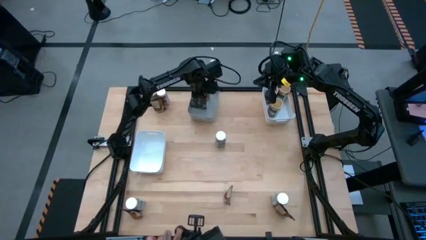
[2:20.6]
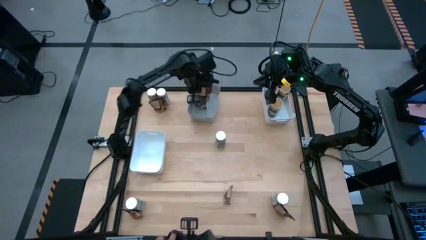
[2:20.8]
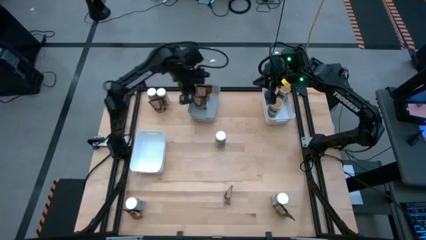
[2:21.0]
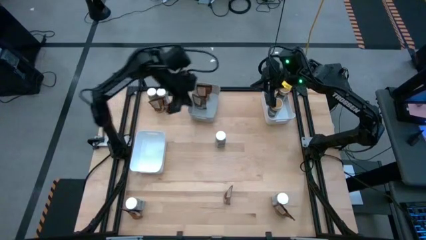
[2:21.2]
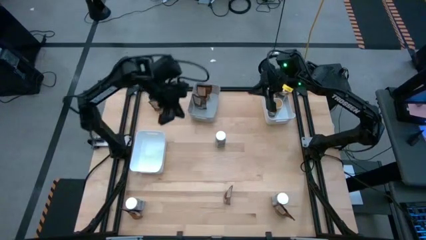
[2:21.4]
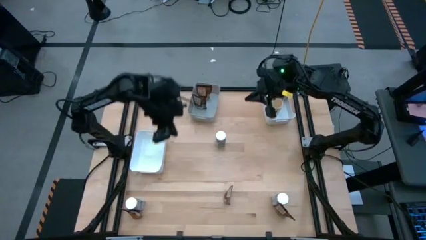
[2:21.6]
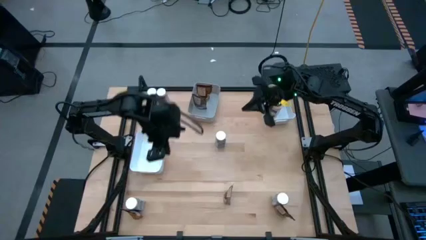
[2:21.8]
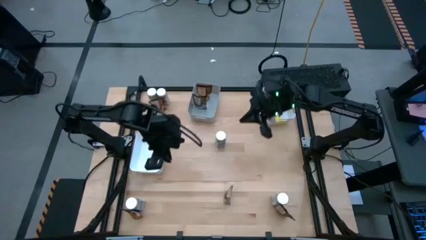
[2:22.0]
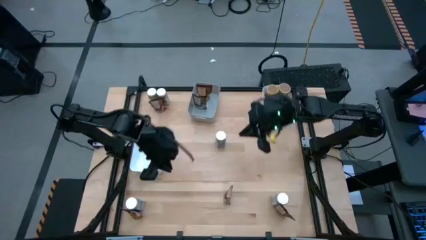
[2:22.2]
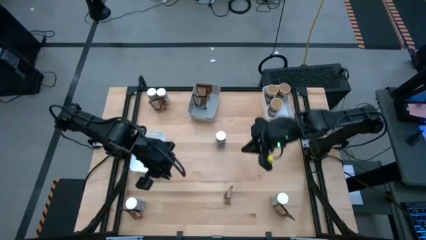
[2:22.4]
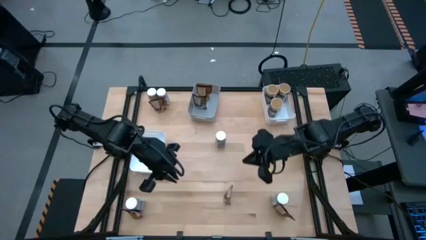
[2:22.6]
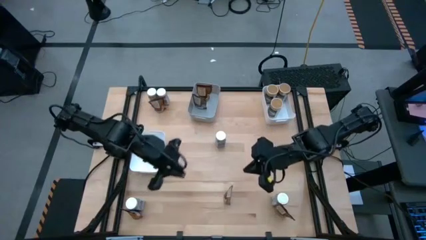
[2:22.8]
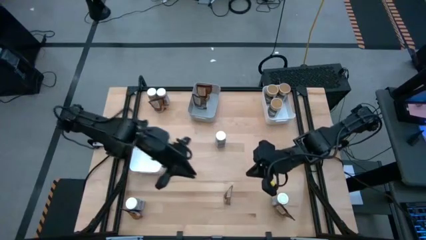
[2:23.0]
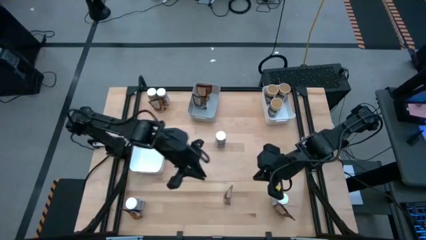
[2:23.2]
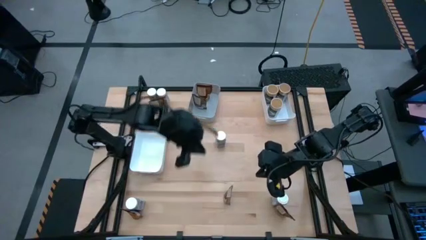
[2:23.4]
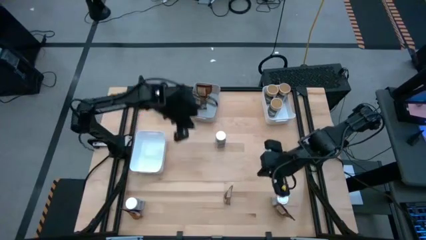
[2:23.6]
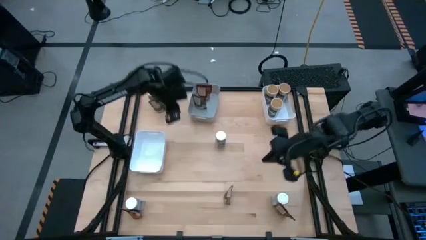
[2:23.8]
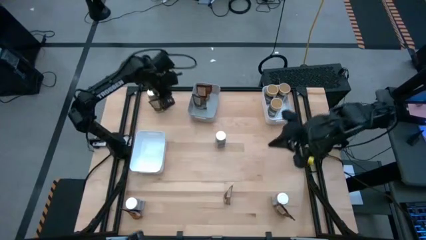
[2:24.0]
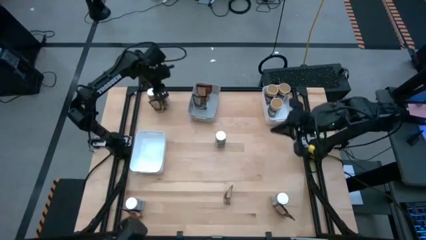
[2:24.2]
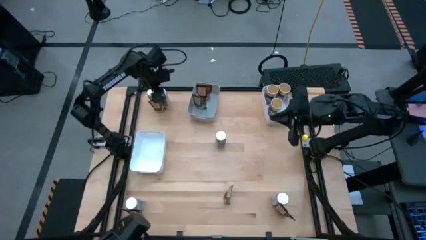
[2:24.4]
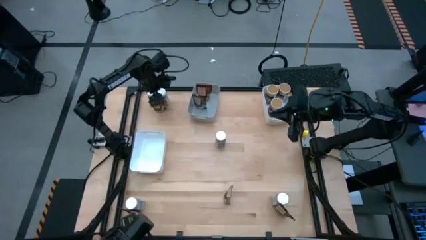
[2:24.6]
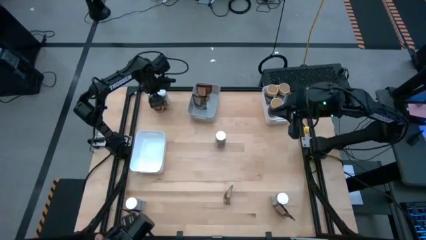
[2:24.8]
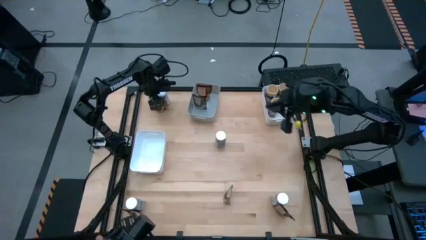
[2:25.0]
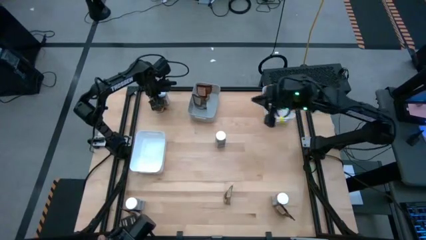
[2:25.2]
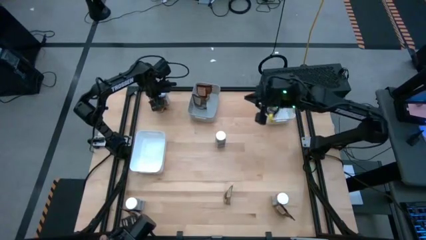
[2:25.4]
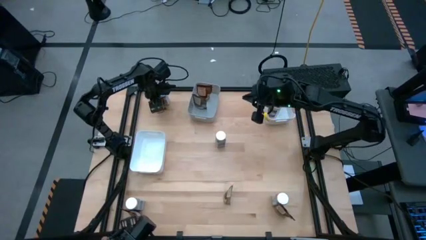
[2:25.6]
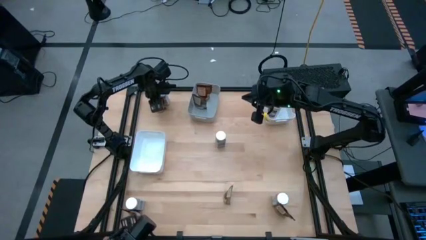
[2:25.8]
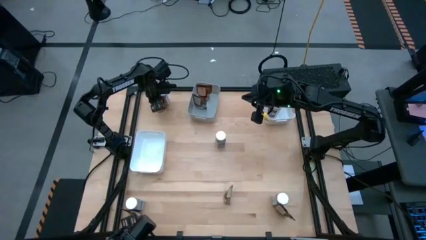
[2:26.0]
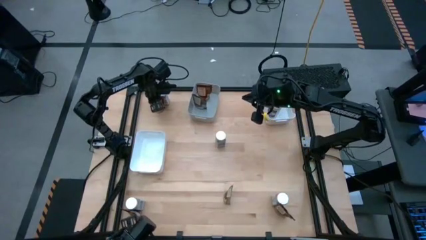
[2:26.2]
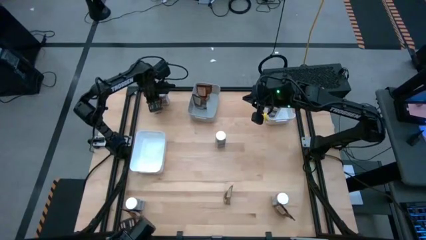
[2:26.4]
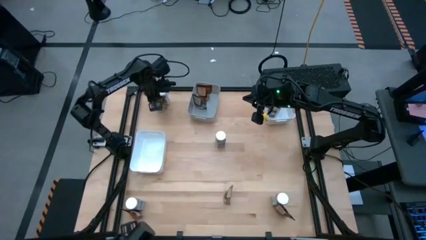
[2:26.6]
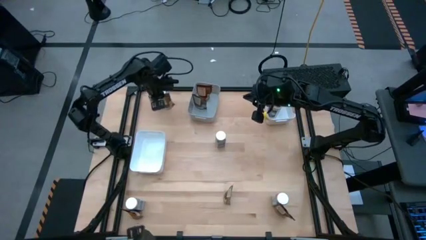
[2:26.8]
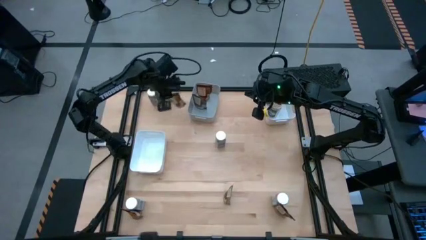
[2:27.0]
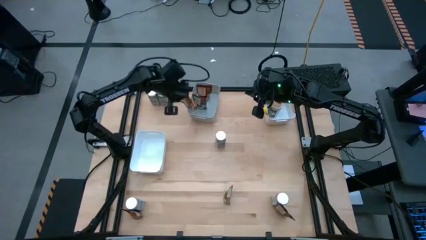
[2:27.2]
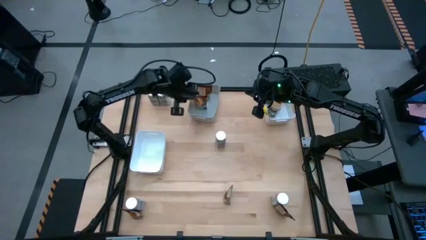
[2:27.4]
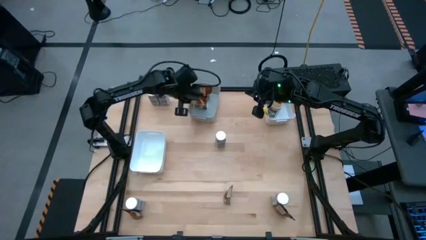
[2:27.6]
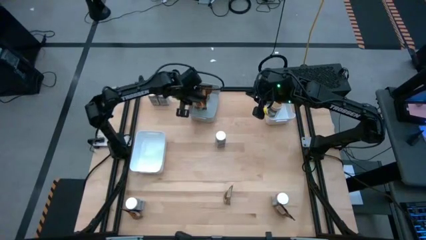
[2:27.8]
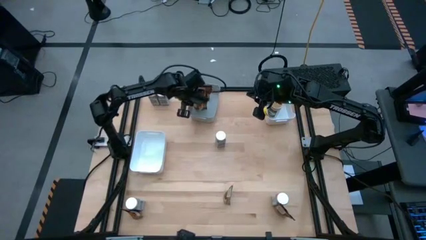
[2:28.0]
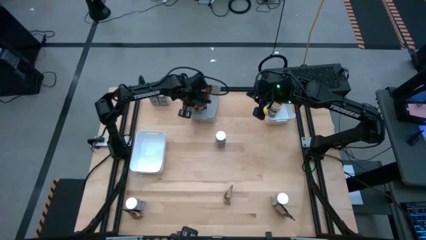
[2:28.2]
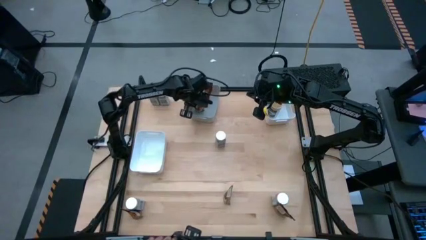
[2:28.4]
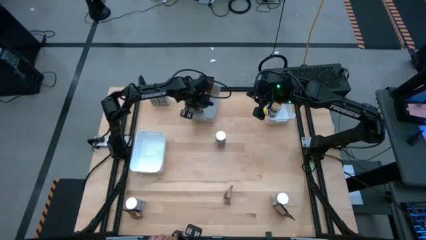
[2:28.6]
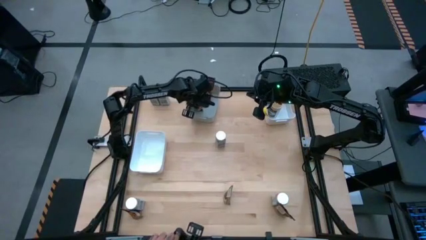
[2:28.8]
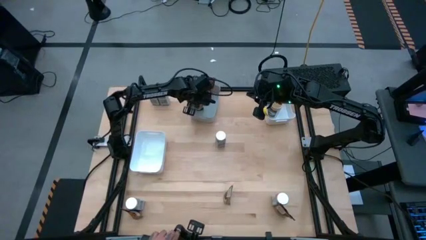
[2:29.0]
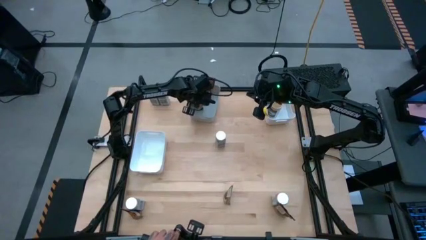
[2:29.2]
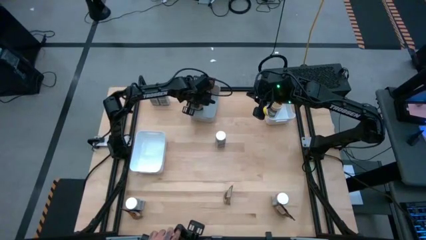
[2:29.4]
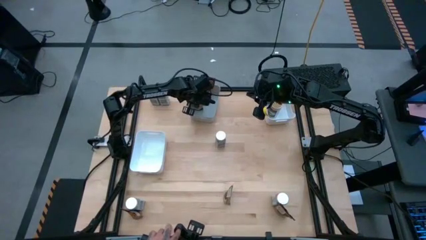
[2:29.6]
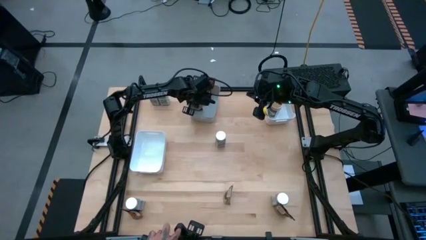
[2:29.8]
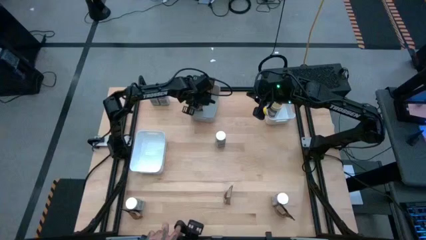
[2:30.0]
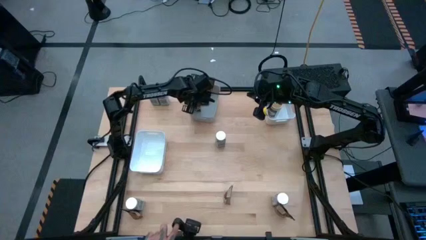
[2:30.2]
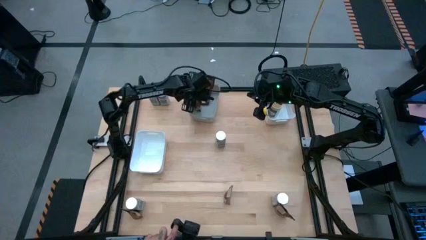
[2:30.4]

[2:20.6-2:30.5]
Task: Sort spices by type
Put the orange spice pack into the gray bin

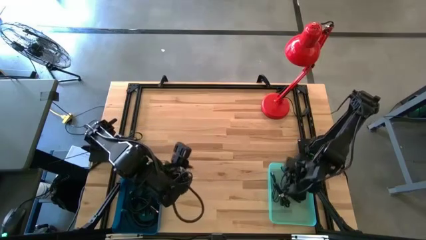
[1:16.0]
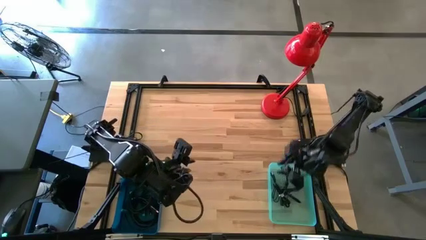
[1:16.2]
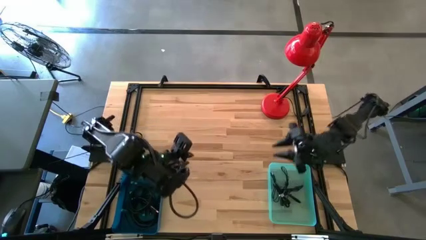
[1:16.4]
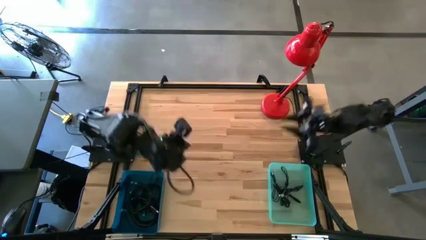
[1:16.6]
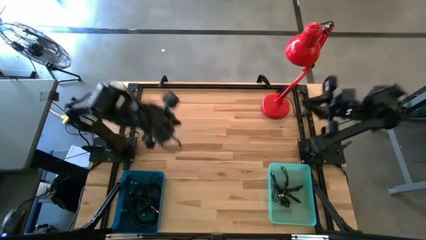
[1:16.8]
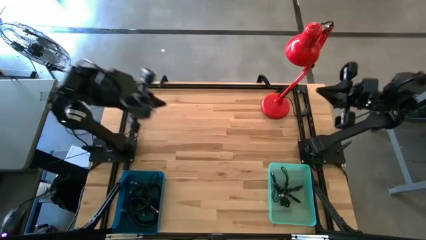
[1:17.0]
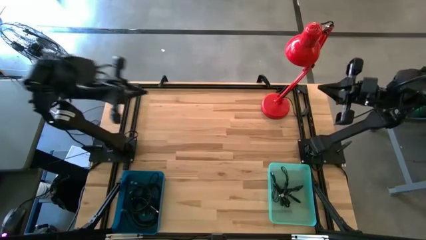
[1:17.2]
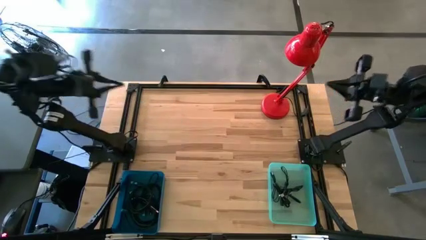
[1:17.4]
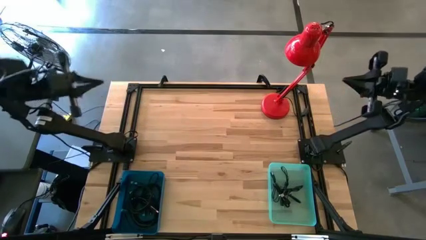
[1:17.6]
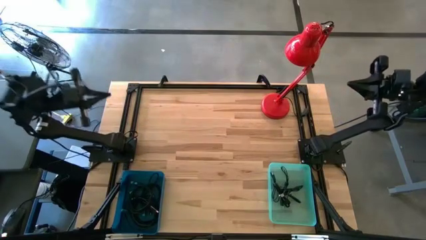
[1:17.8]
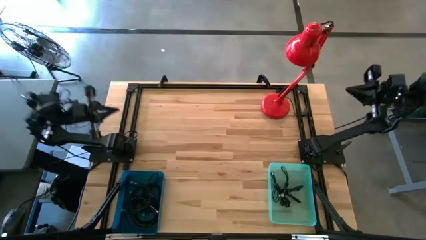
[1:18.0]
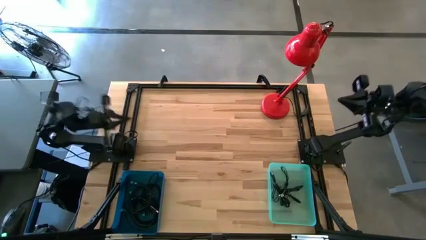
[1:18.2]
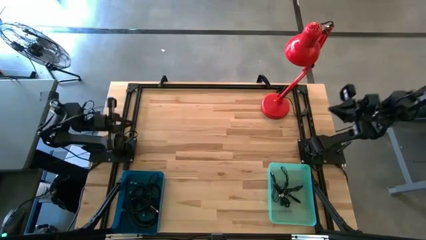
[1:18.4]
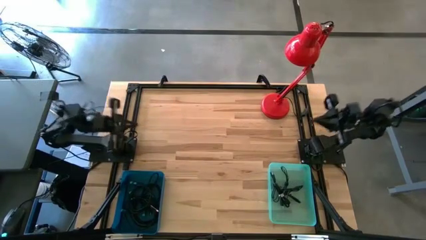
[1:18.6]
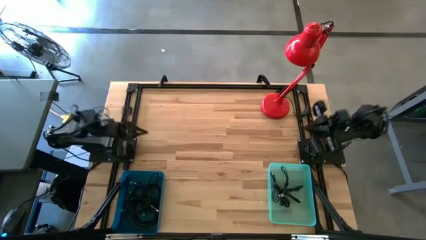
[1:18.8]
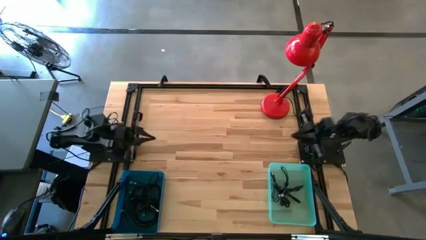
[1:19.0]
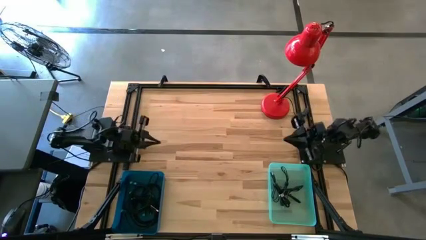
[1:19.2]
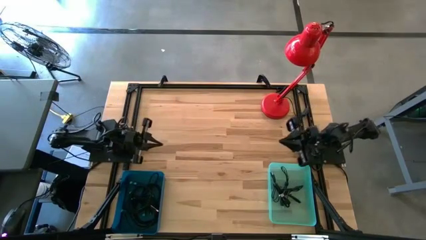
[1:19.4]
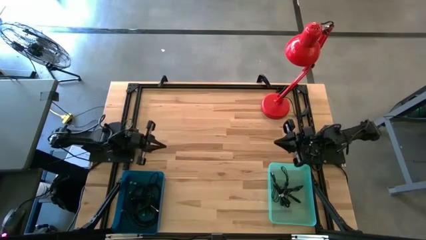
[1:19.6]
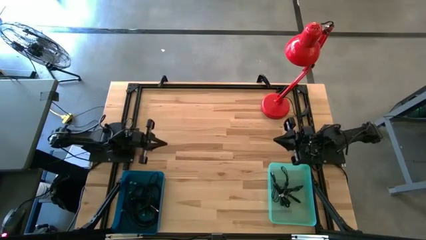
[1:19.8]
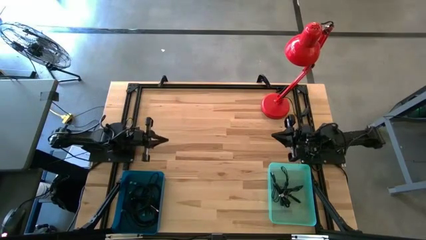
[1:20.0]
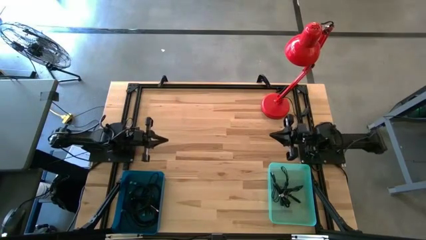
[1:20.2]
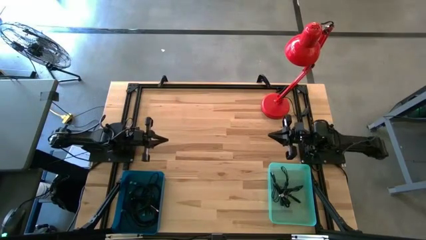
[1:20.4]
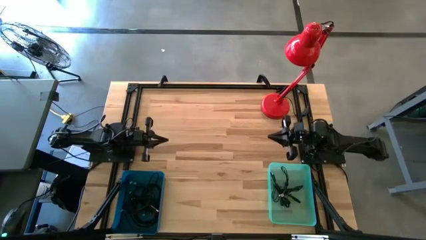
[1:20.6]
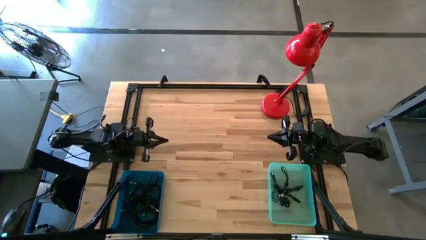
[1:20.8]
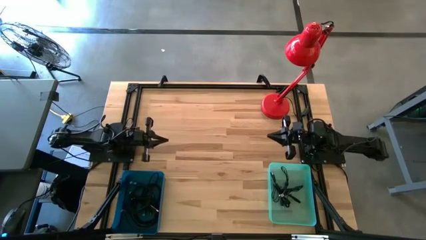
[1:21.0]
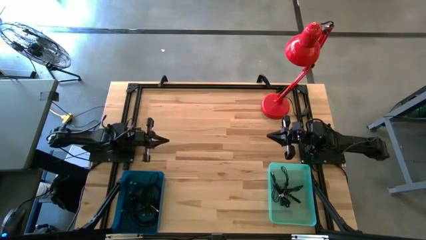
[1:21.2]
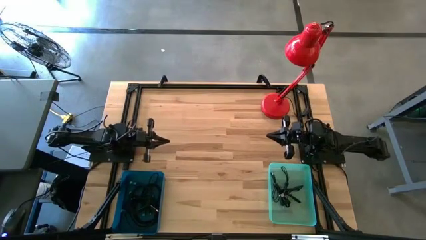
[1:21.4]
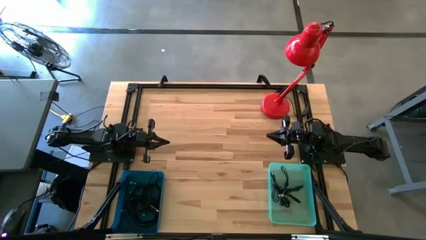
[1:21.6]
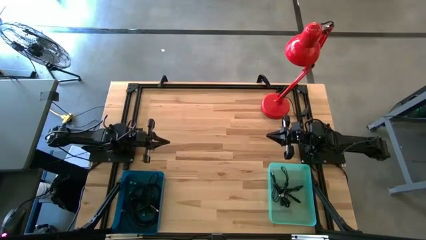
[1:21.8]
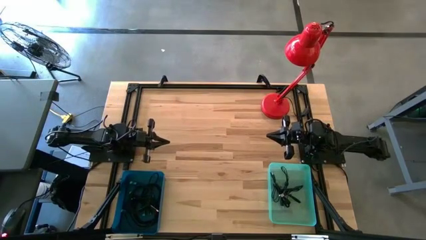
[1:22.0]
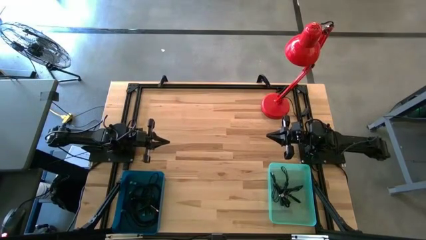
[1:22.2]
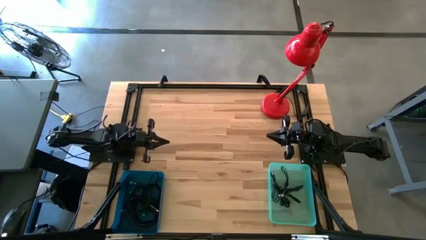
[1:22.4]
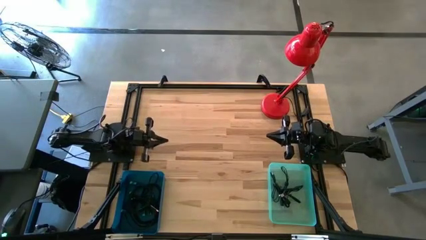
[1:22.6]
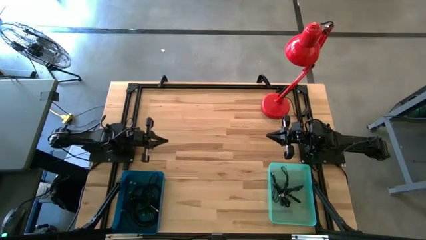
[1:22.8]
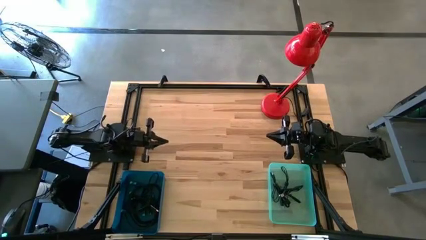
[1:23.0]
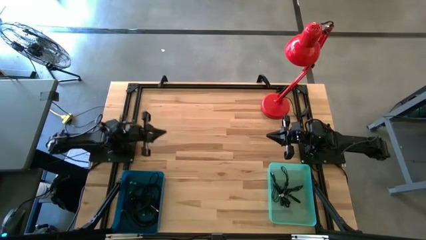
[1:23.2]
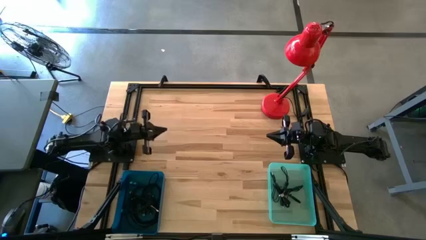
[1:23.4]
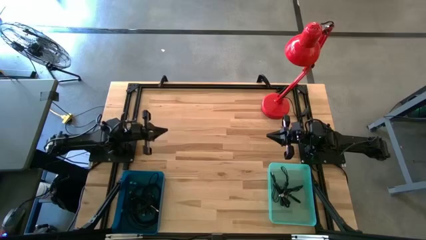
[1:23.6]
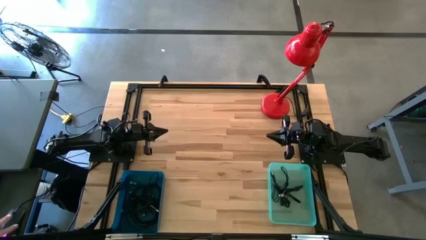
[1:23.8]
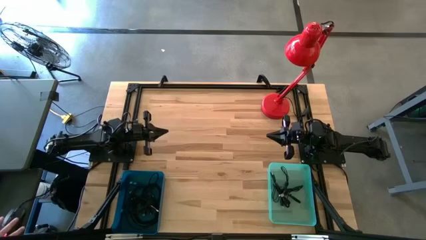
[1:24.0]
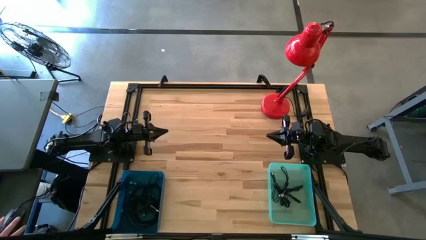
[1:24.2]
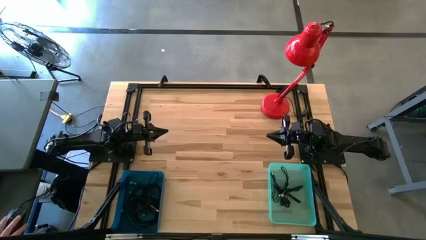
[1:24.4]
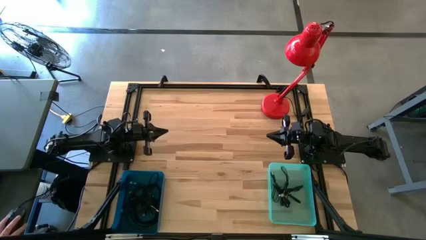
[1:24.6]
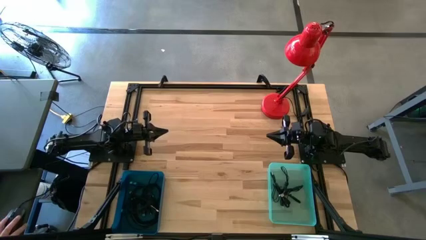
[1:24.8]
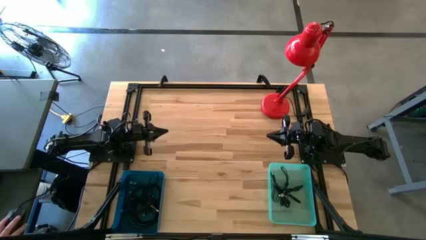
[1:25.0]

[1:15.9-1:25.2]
Task: Pick & Place USB Port
Return to Home Position
